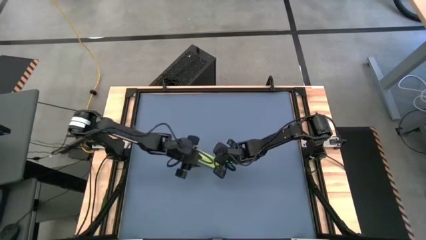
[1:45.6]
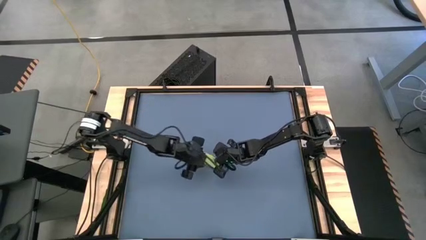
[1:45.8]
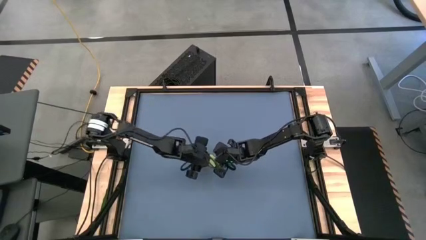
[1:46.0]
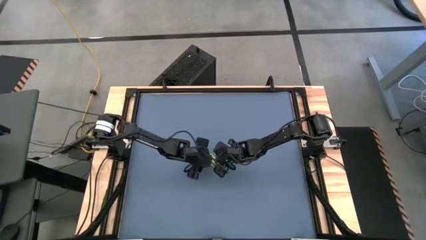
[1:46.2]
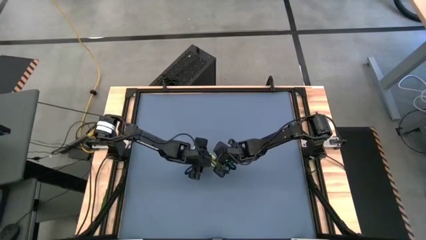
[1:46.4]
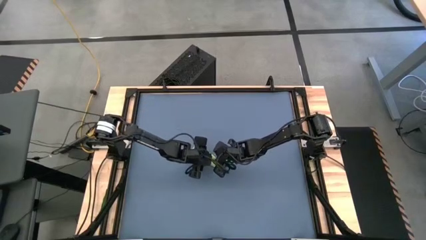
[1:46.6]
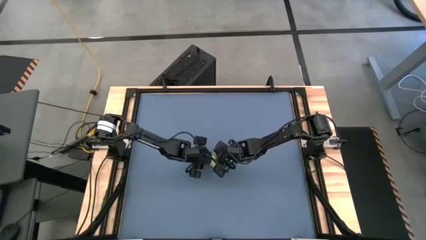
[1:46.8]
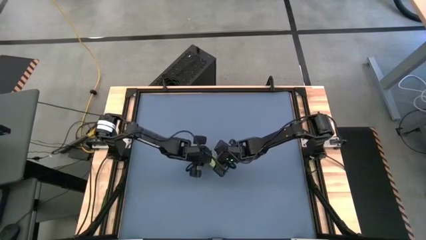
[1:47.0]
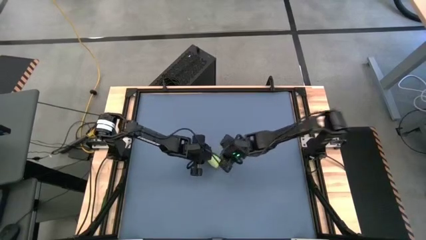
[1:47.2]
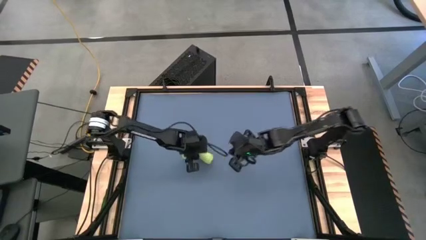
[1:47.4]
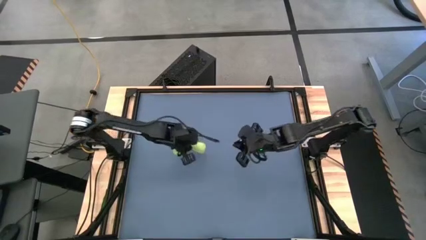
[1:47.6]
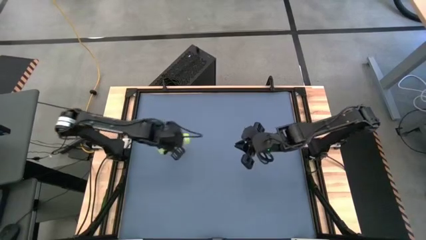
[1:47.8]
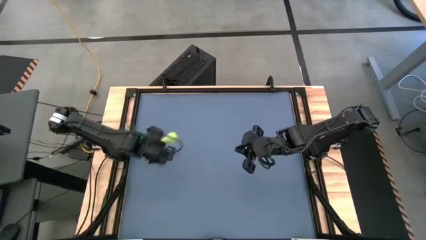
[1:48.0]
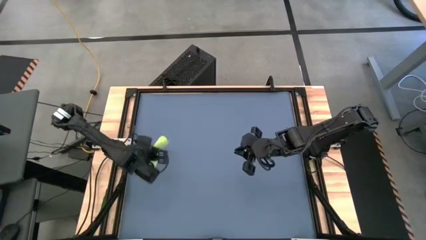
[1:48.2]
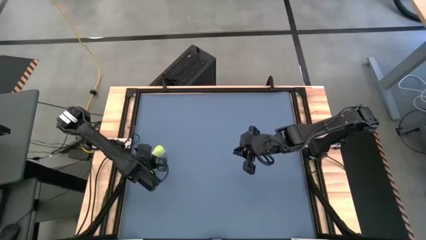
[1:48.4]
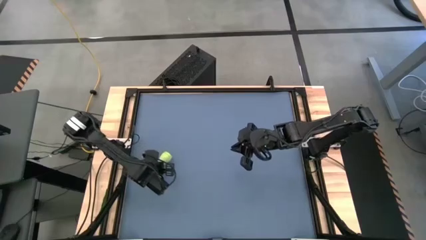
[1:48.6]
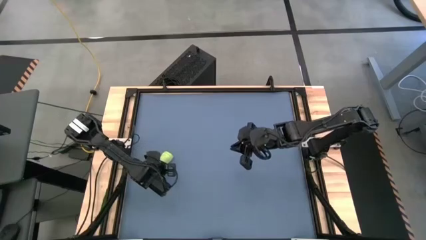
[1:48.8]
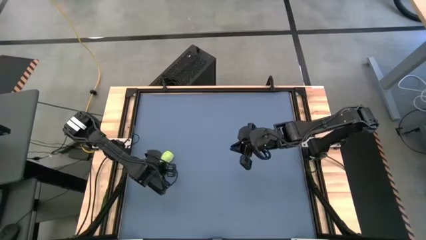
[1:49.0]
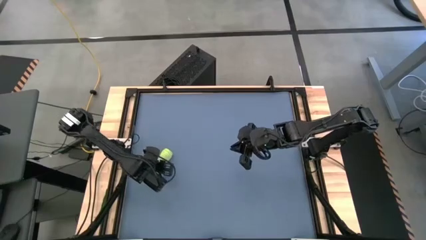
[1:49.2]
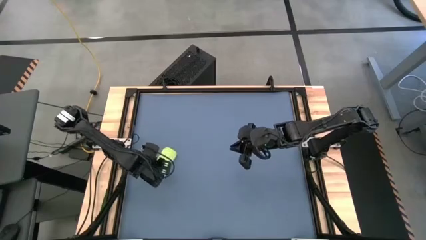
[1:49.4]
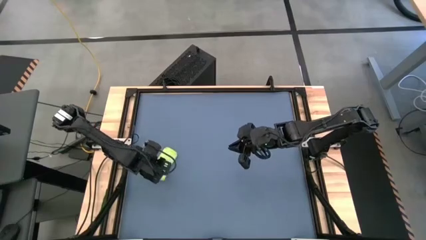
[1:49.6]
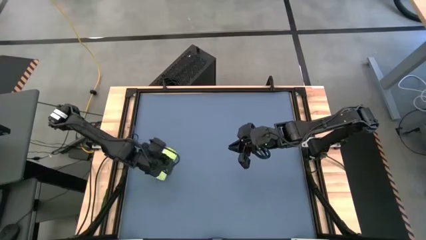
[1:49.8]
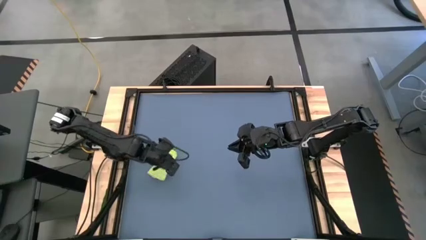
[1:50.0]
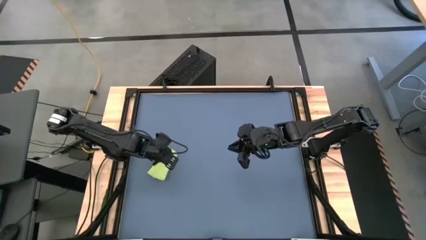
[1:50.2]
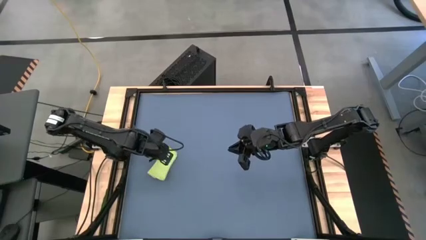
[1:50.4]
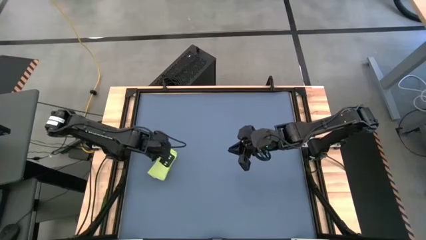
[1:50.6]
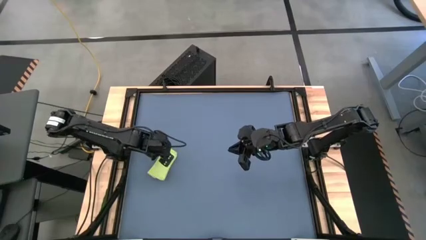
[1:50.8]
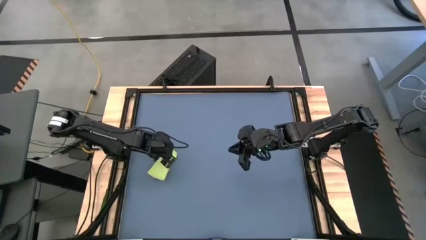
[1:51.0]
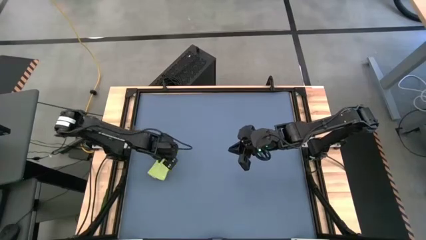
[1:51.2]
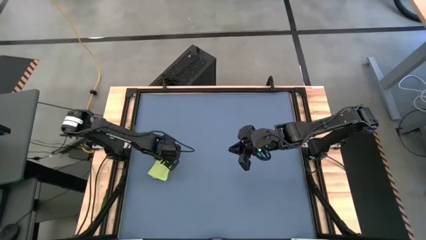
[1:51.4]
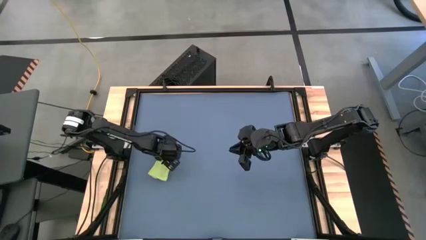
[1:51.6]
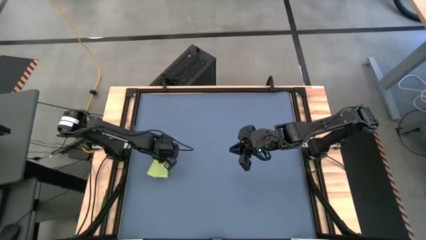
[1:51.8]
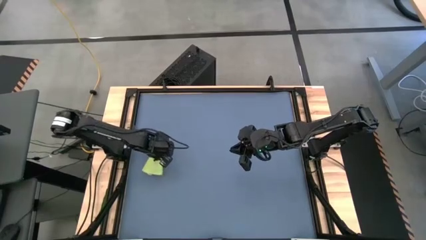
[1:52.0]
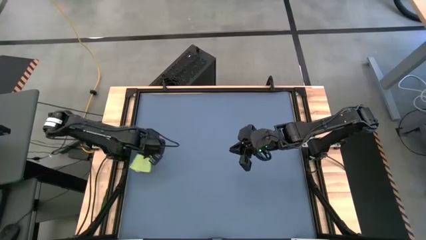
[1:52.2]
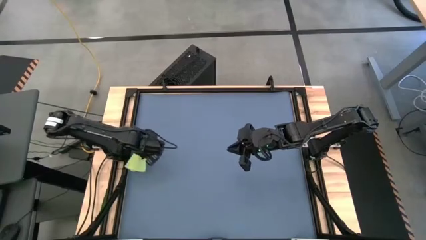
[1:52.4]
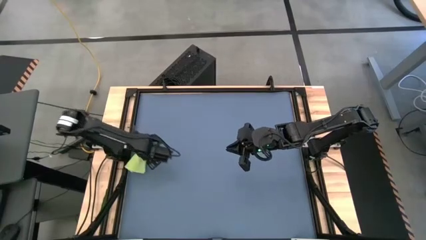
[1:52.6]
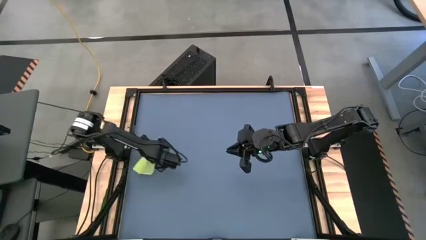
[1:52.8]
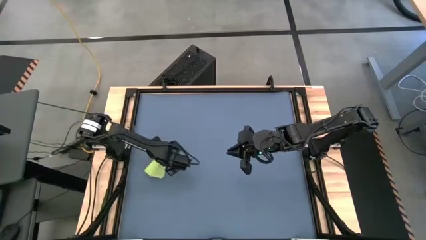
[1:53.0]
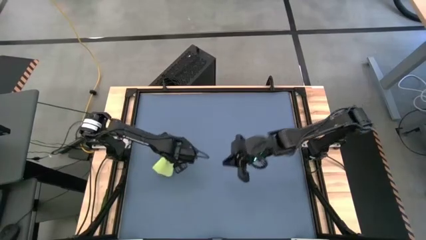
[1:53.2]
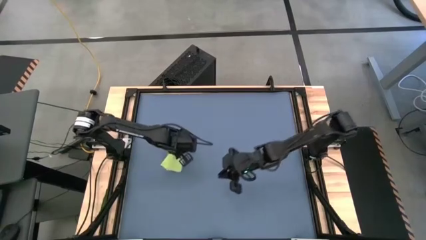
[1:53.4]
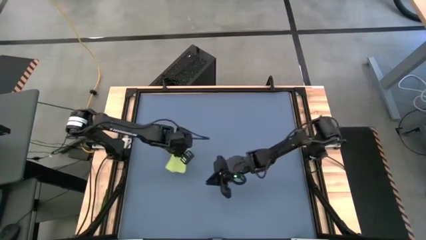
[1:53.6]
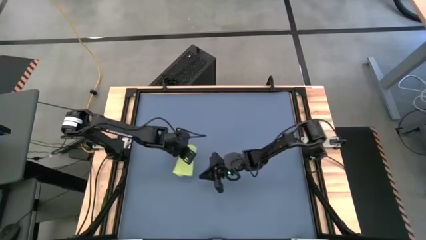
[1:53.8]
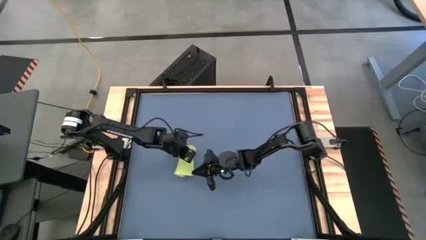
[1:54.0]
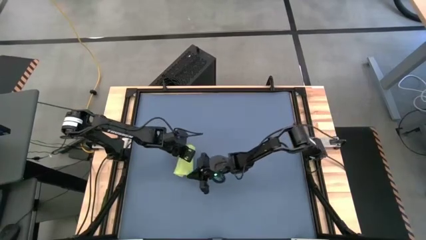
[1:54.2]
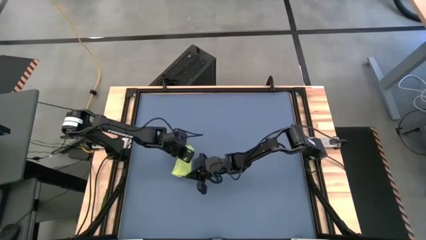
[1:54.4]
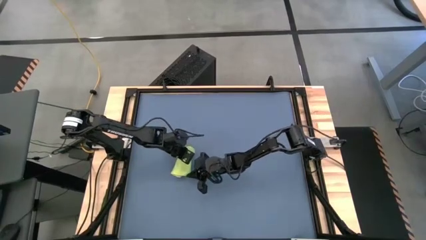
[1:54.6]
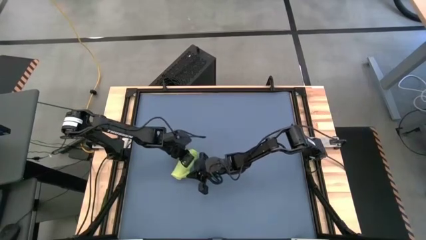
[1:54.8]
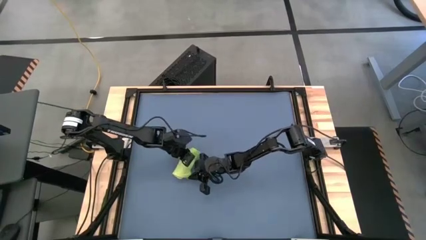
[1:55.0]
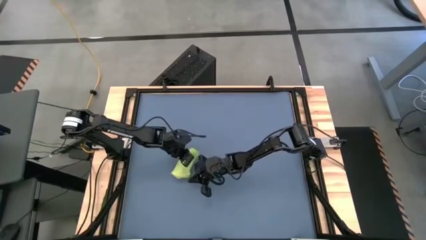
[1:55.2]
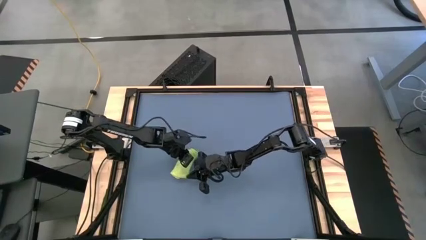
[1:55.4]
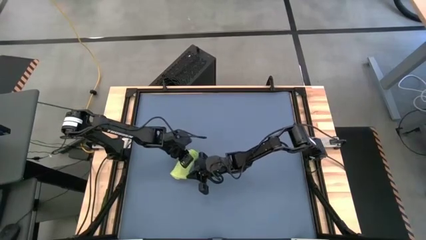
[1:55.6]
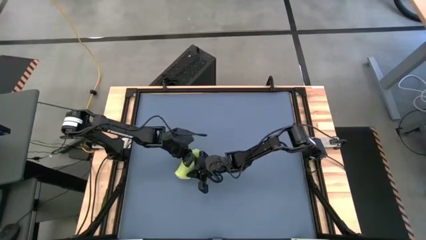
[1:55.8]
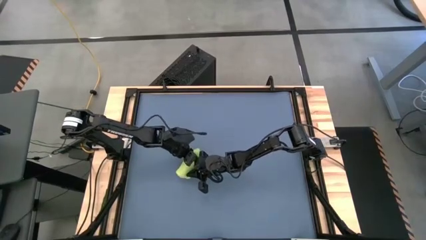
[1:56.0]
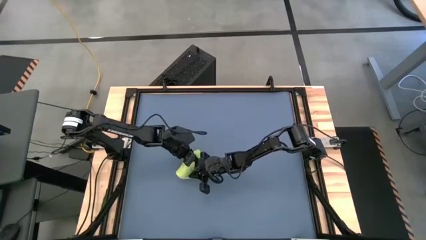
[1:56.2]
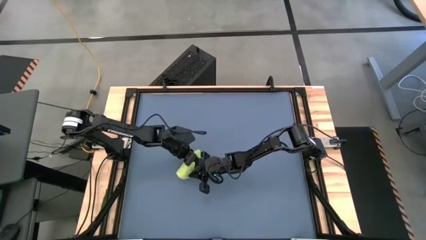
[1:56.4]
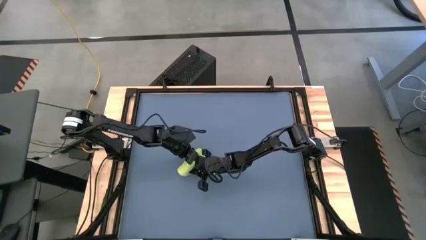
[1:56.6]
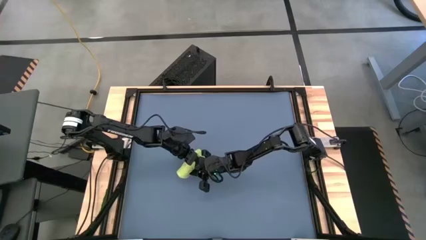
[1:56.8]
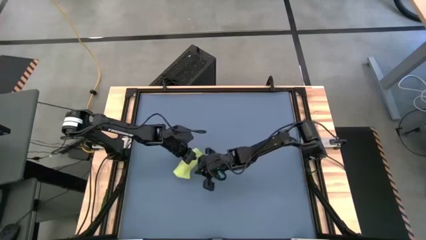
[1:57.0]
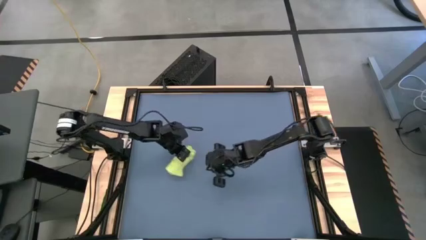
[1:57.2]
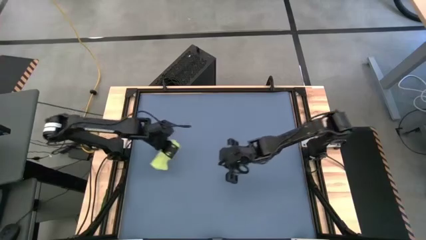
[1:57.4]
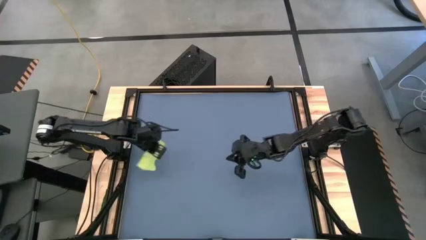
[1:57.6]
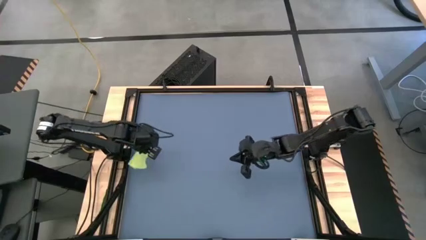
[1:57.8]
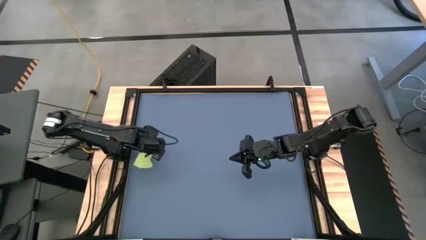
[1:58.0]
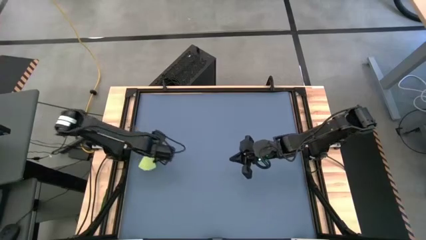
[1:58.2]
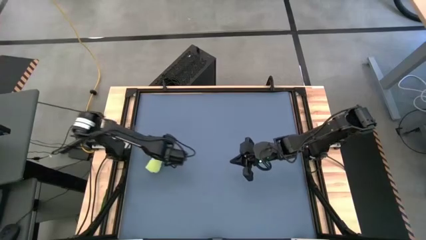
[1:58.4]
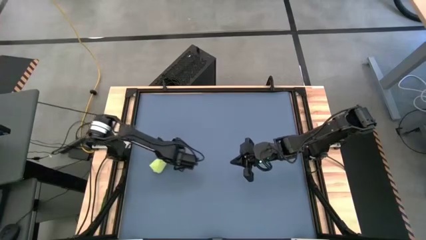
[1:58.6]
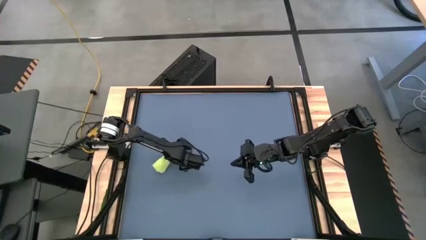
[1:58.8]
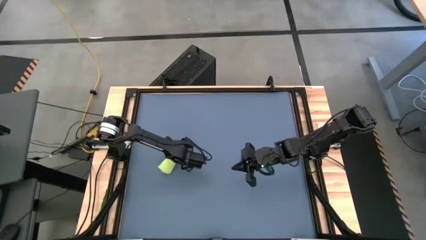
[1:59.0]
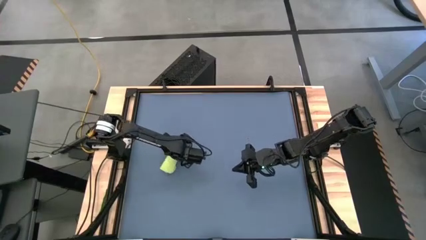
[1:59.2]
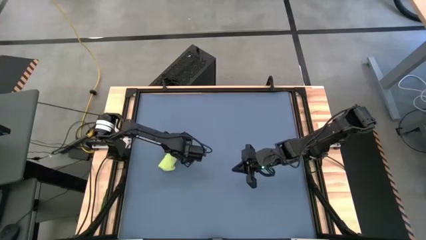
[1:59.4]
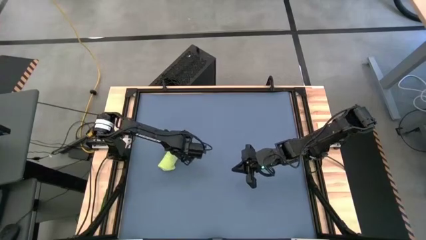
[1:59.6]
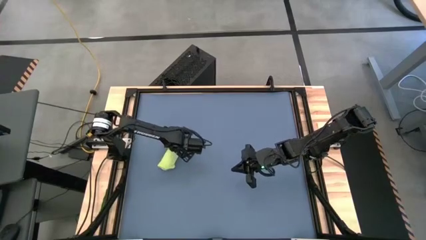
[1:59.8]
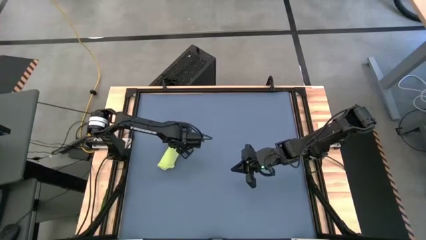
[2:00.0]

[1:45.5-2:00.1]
Task: Roll towel
Move the green microfiber towel to the middle left of the table
